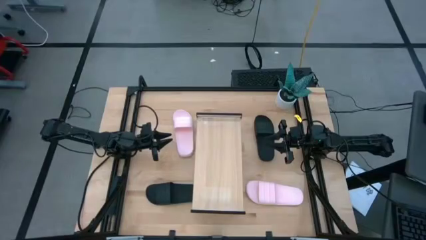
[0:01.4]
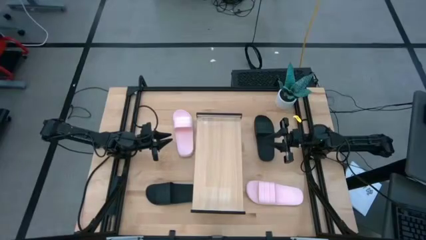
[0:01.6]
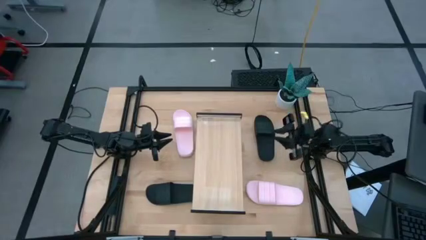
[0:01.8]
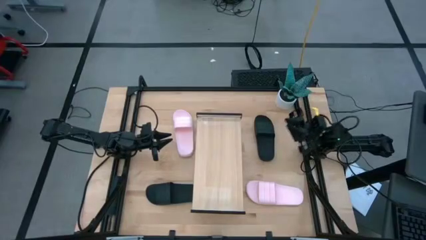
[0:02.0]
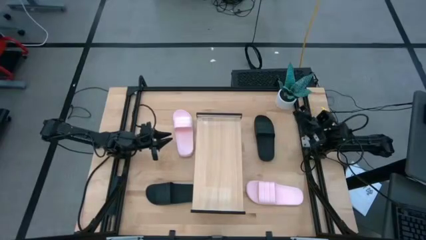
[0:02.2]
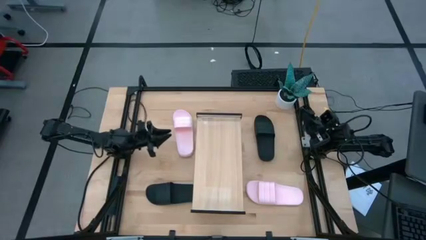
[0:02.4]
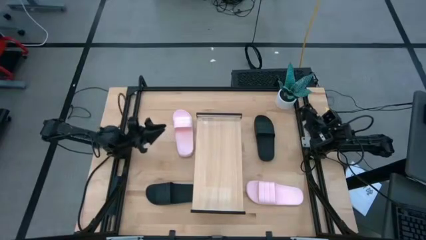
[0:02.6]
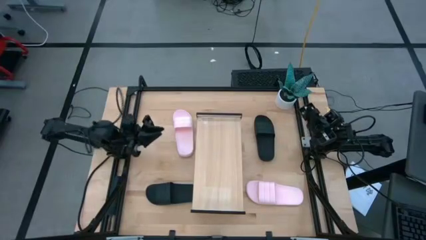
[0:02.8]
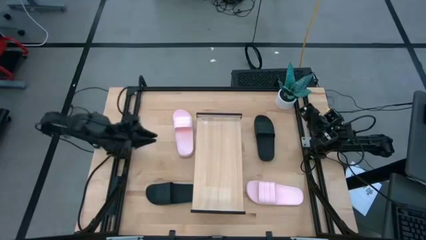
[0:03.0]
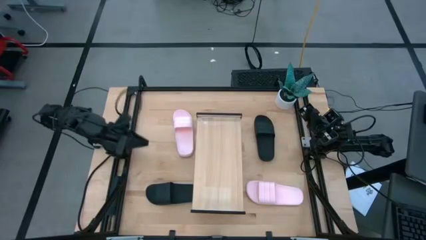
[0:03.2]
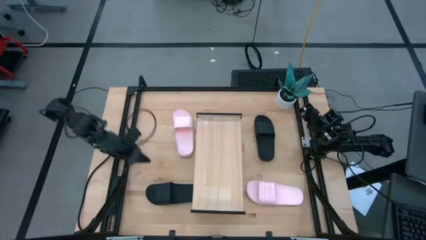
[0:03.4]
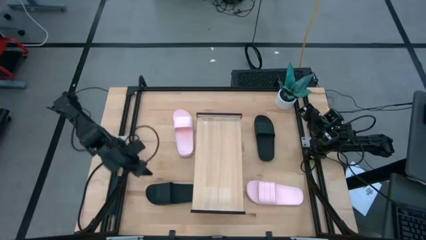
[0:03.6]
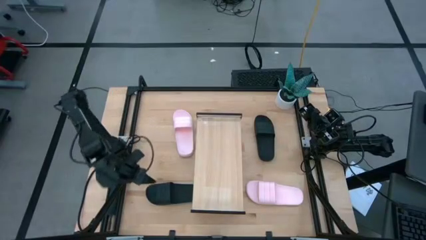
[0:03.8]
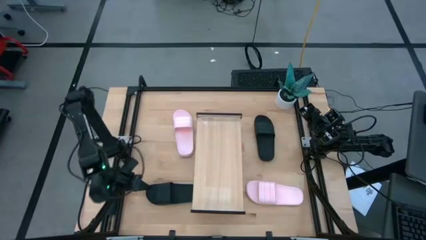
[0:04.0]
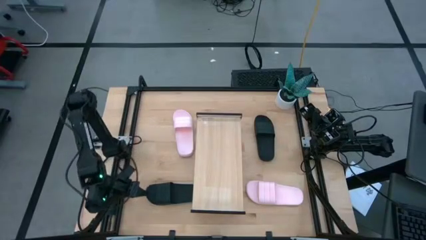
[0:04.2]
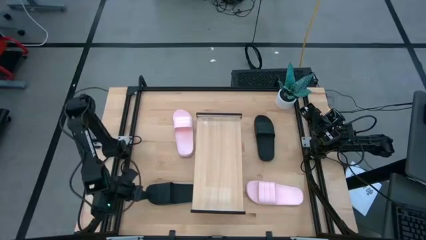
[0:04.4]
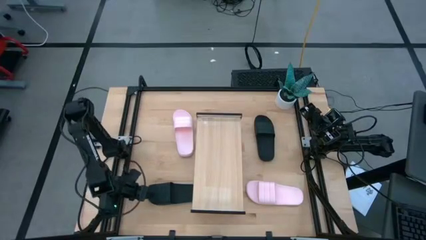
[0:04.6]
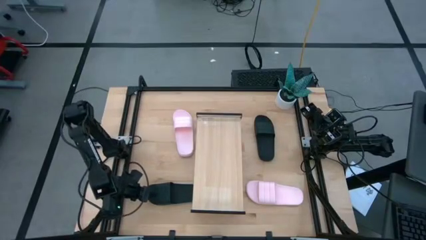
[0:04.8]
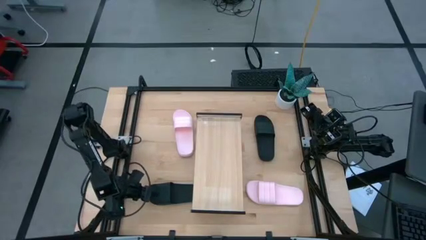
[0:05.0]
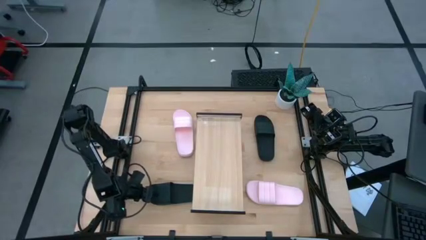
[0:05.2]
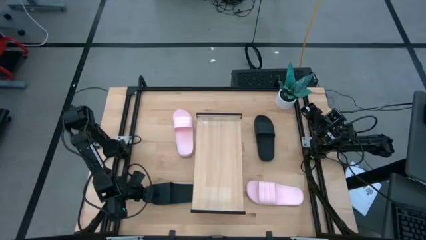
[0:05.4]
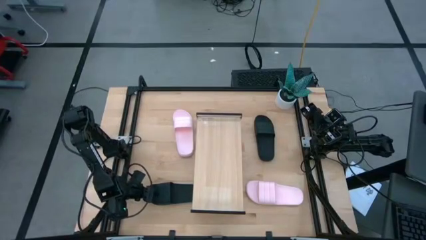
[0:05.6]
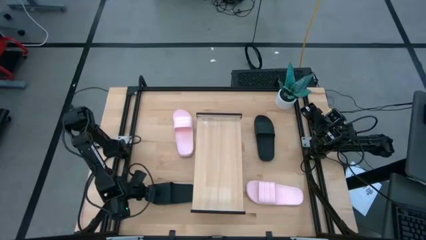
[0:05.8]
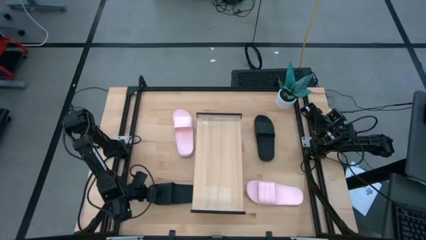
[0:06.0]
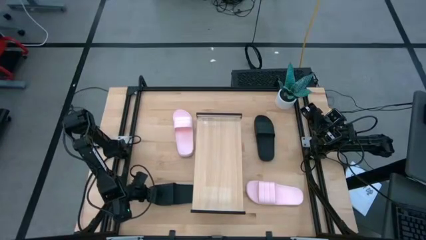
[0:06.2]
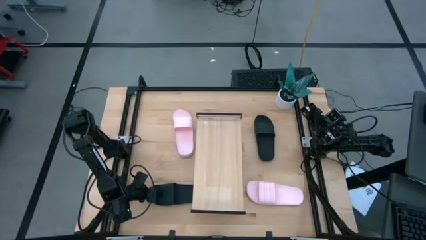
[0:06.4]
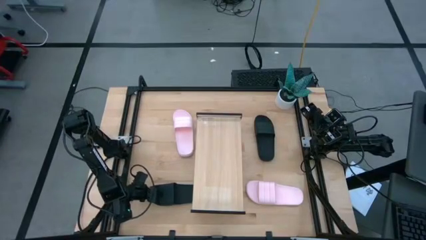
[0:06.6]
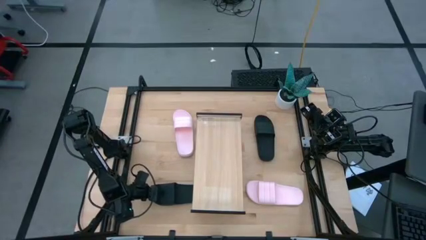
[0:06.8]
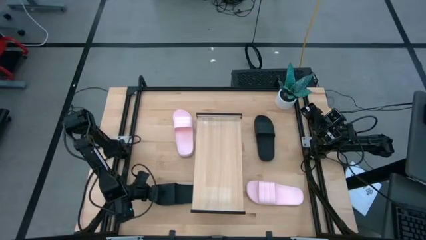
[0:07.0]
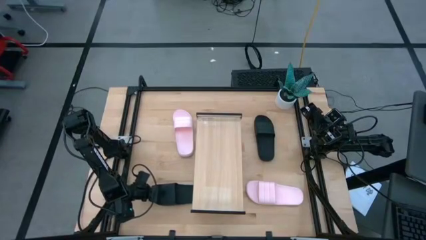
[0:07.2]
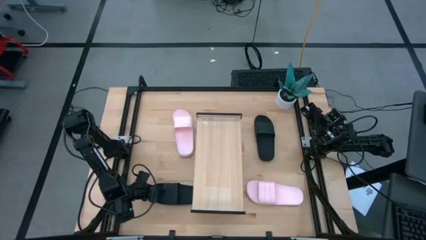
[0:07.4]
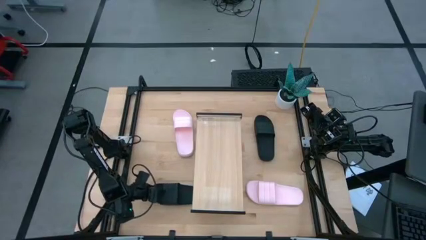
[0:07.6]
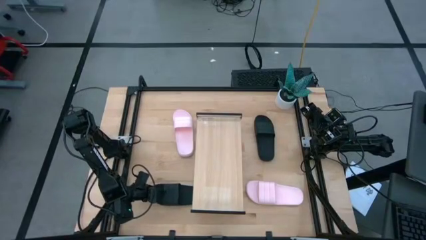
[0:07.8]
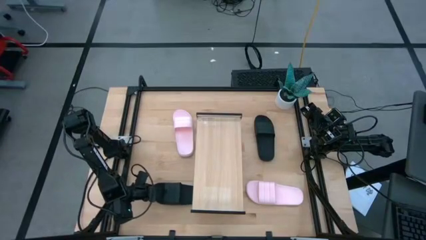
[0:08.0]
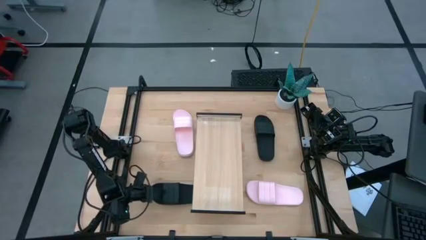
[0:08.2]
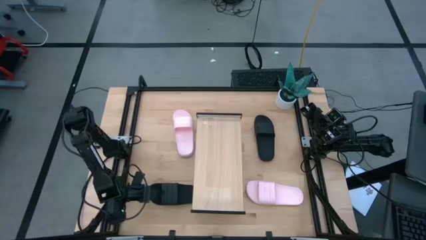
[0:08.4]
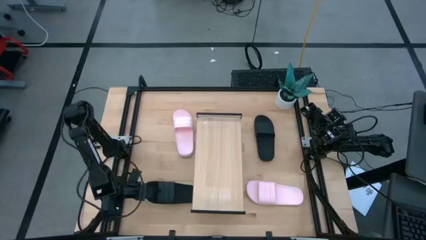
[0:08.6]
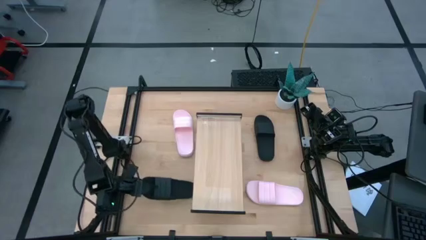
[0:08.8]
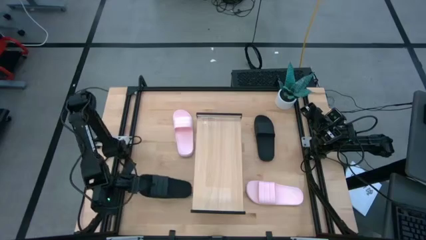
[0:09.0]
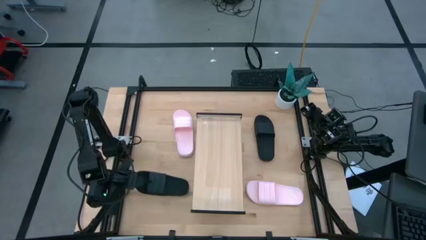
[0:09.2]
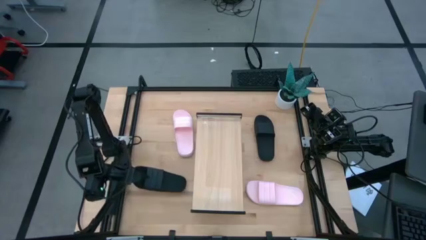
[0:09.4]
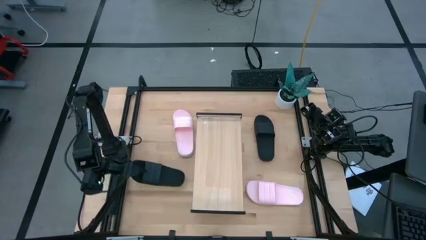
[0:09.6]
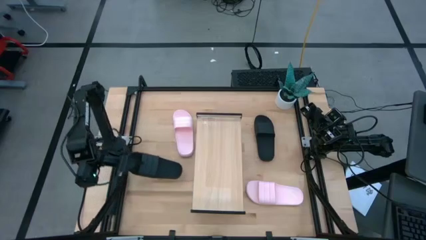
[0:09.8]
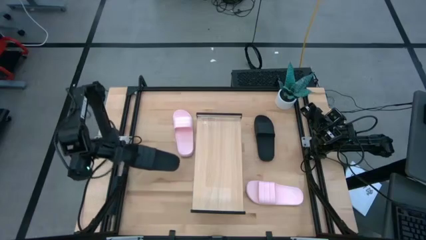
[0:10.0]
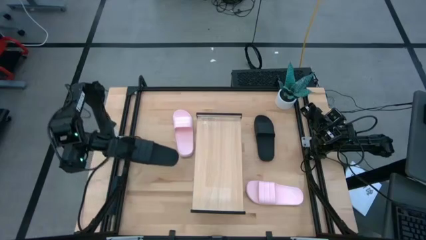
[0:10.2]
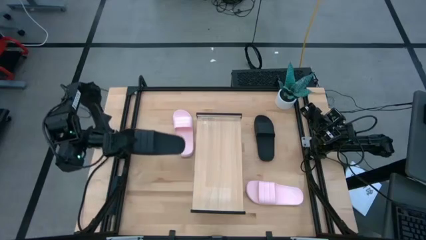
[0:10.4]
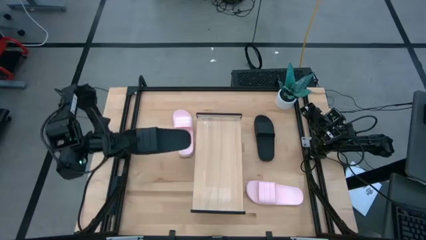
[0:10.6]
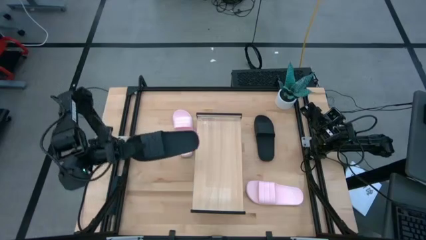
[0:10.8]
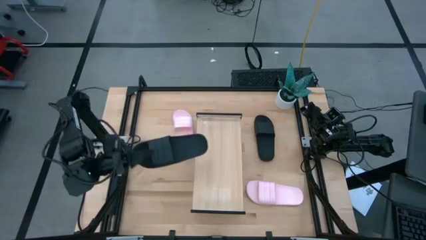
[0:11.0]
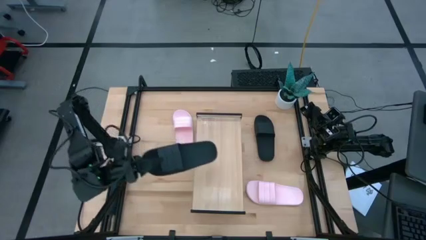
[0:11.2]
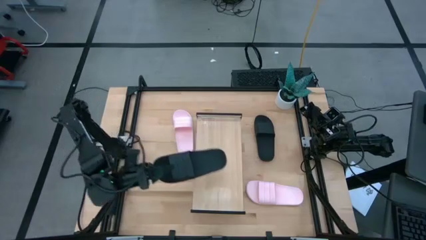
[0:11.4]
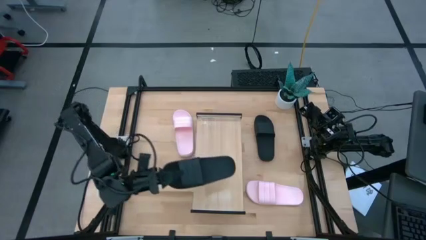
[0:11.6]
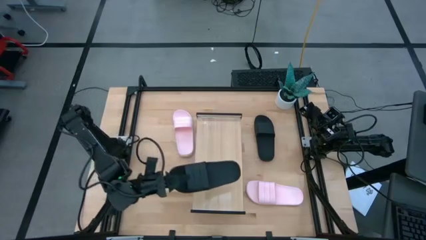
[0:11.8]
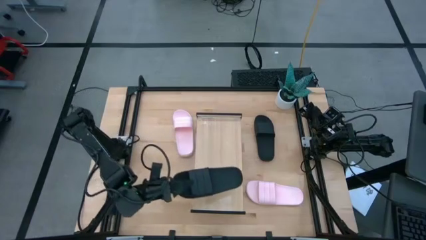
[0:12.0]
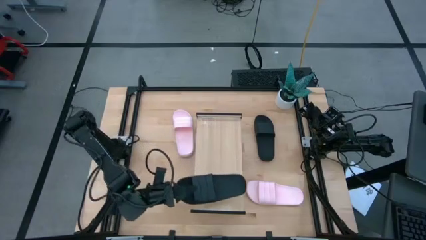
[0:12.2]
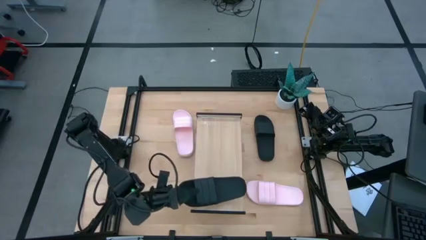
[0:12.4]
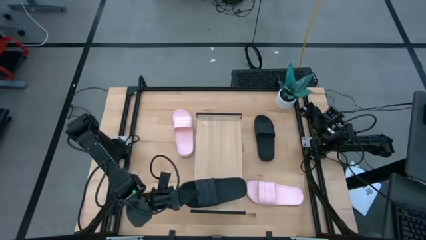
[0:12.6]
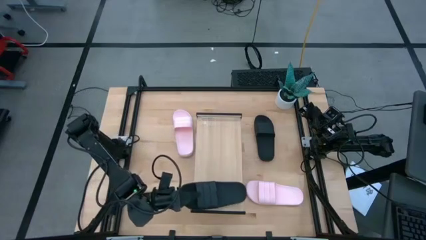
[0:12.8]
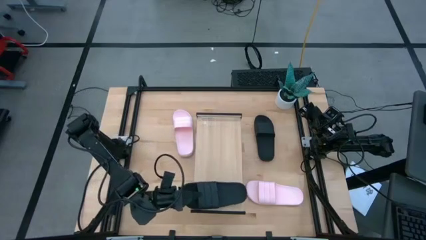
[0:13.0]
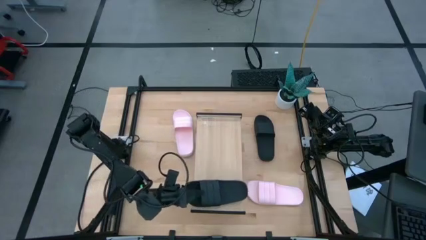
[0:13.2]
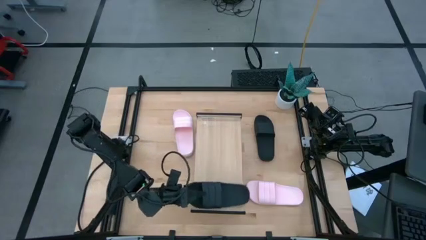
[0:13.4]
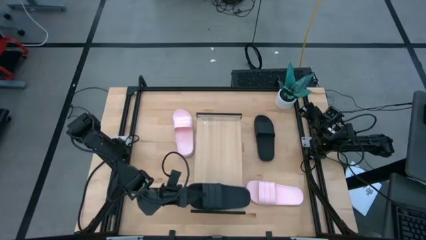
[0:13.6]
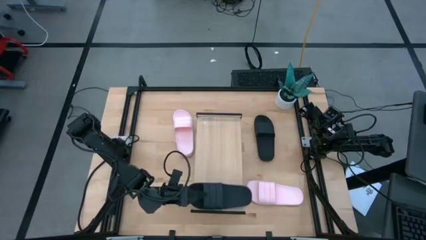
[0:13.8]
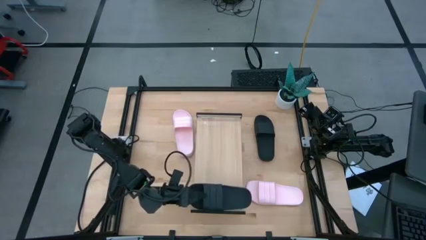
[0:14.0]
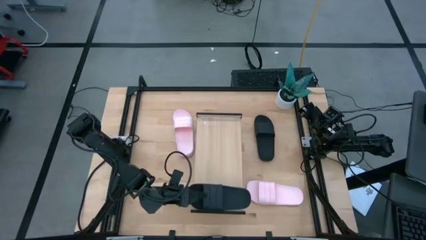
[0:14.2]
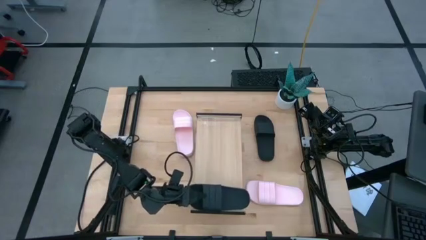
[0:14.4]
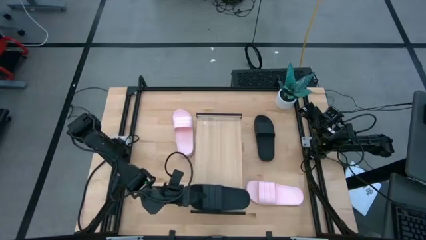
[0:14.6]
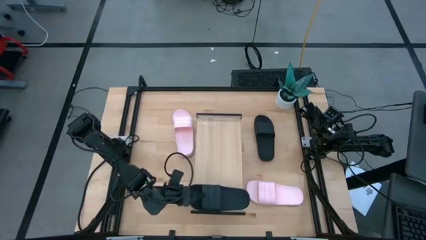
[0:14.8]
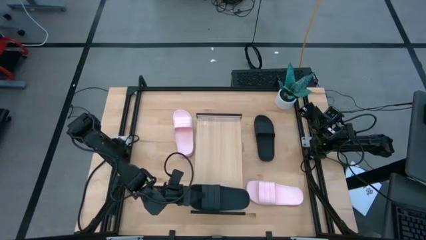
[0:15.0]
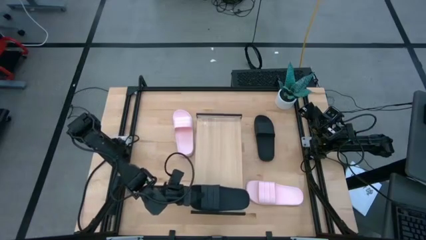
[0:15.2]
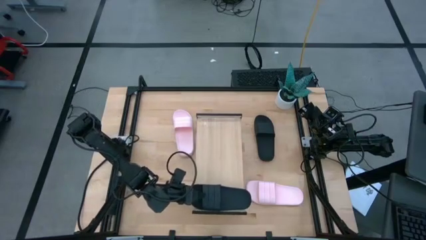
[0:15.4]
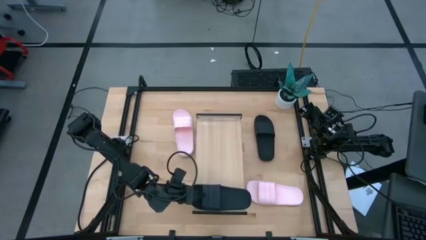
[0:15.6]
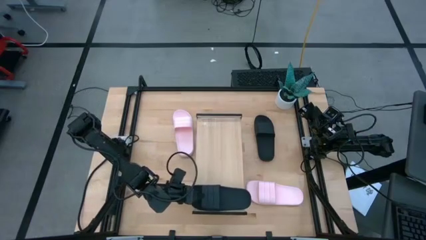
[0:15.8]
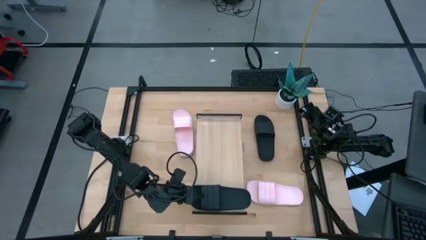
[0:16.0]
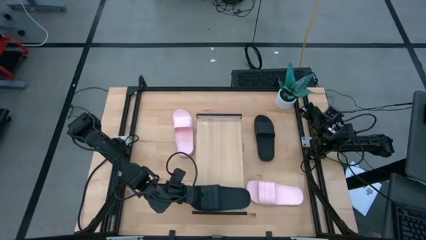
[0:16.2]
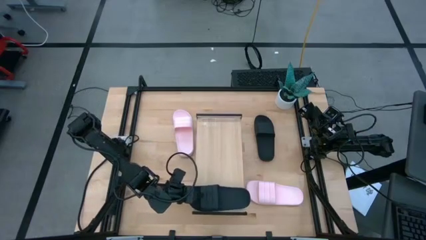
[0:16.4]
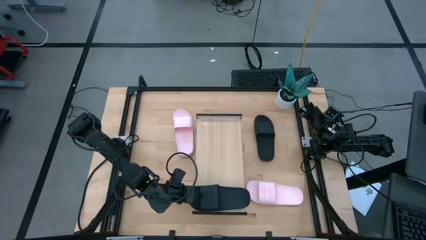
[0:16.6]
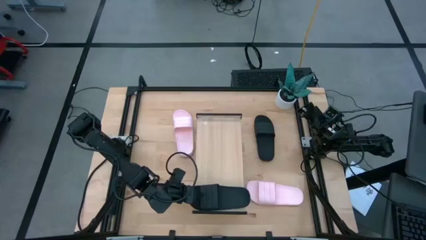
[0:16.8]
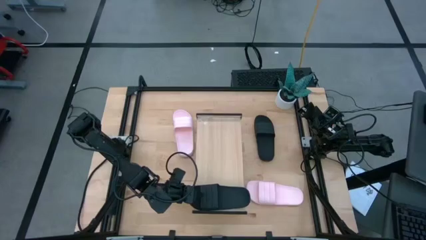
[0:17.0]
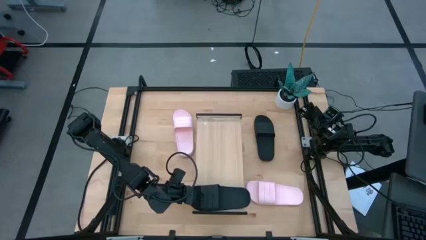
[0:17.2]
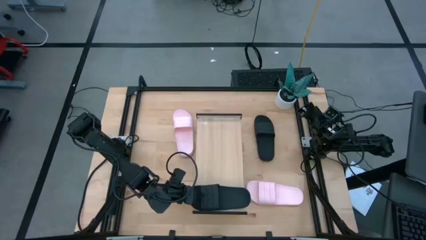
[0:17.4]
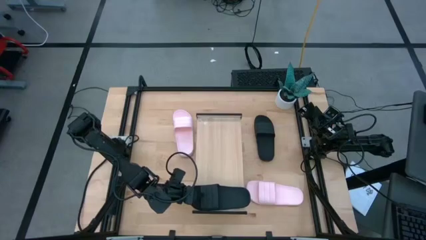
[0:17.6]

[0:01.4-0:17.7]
Task: Pick and place slides into the shelf
Put the bottom black slides on the shelf
